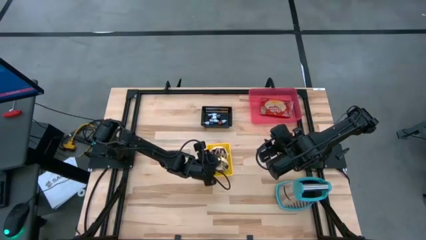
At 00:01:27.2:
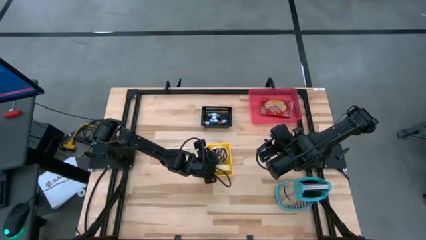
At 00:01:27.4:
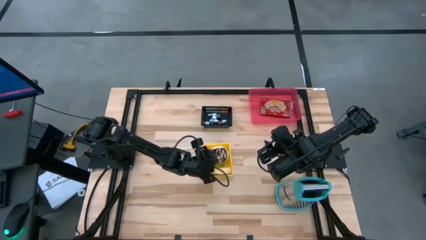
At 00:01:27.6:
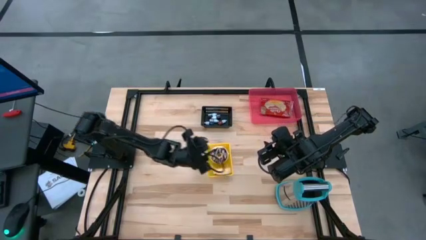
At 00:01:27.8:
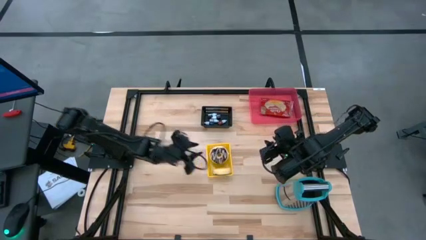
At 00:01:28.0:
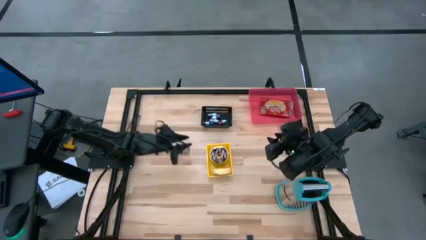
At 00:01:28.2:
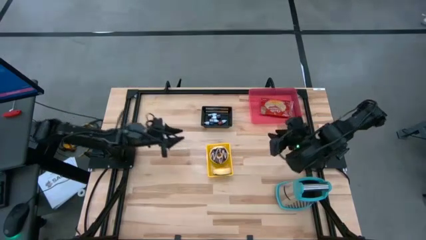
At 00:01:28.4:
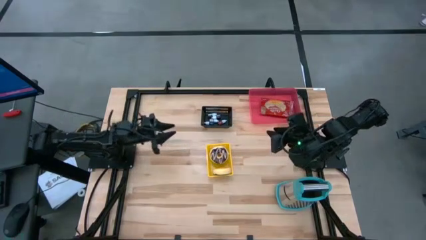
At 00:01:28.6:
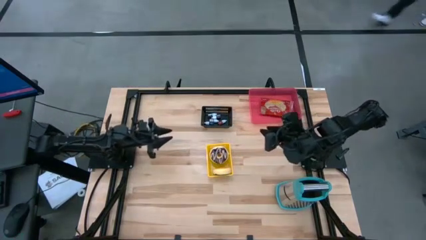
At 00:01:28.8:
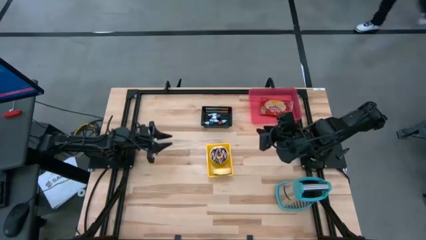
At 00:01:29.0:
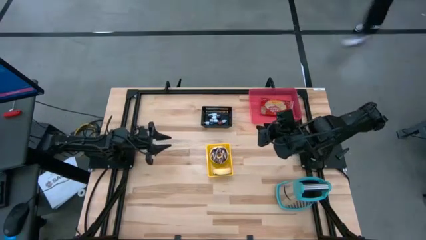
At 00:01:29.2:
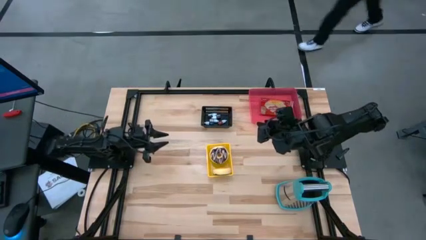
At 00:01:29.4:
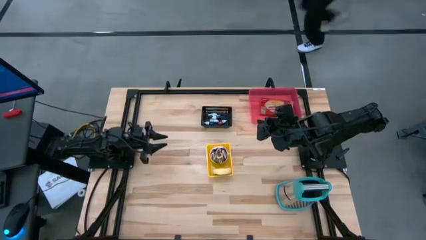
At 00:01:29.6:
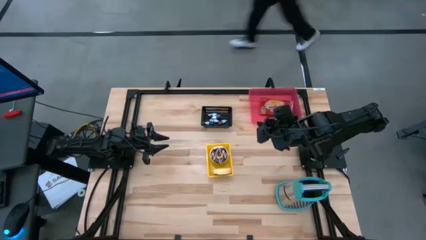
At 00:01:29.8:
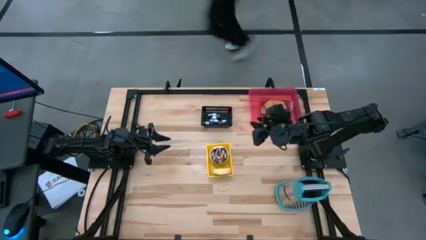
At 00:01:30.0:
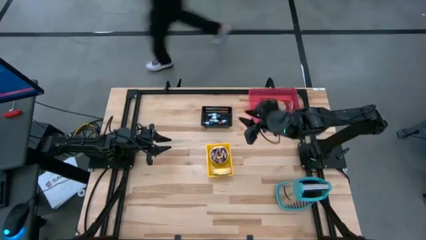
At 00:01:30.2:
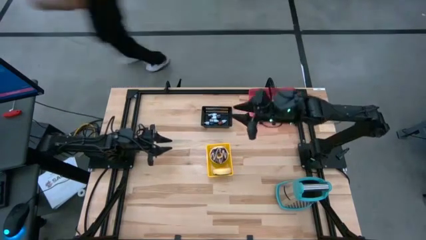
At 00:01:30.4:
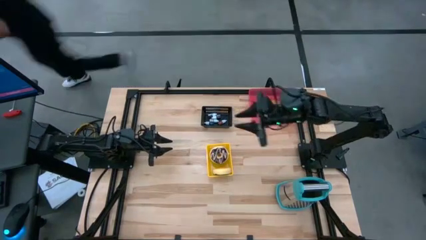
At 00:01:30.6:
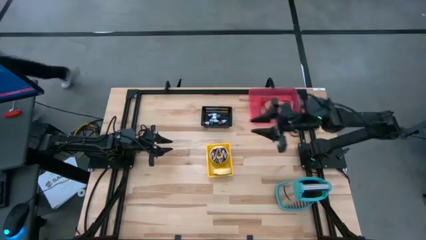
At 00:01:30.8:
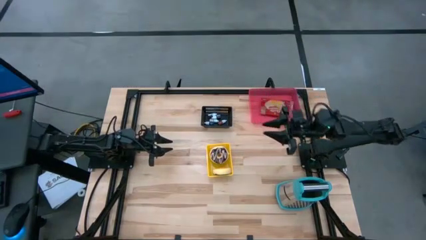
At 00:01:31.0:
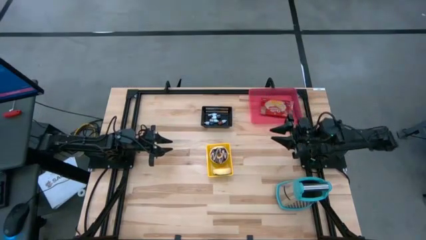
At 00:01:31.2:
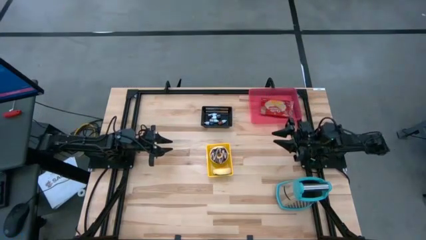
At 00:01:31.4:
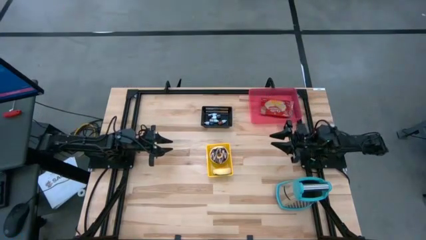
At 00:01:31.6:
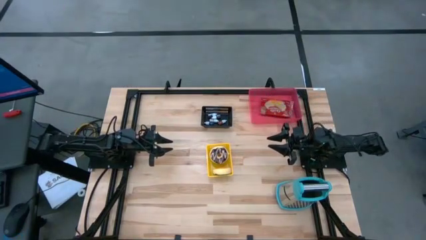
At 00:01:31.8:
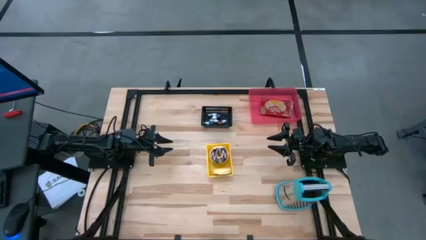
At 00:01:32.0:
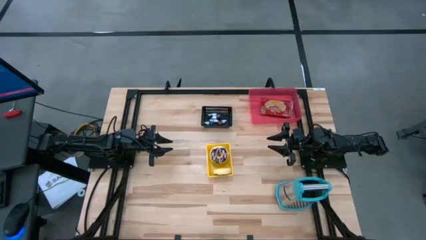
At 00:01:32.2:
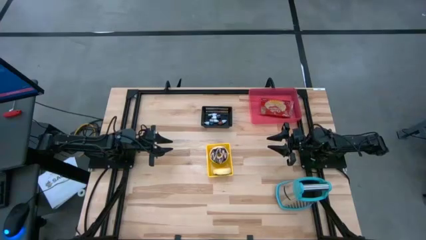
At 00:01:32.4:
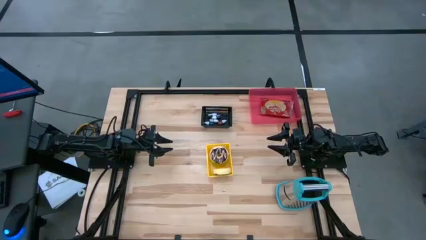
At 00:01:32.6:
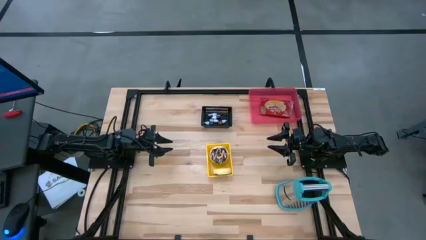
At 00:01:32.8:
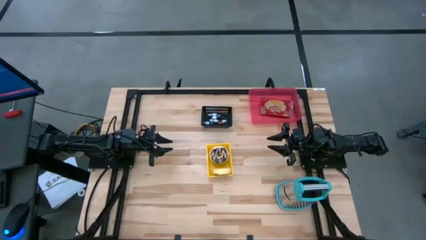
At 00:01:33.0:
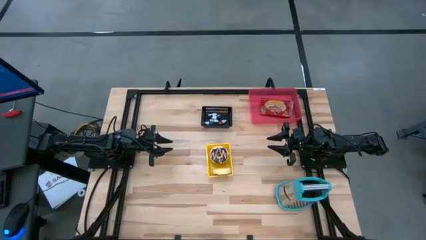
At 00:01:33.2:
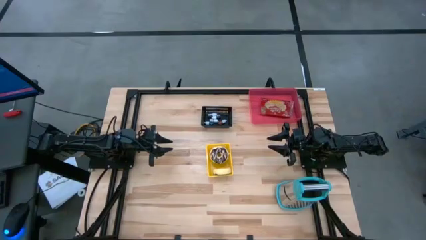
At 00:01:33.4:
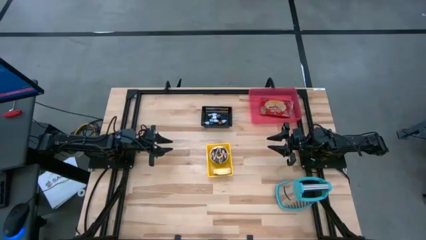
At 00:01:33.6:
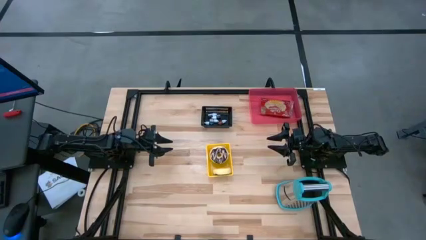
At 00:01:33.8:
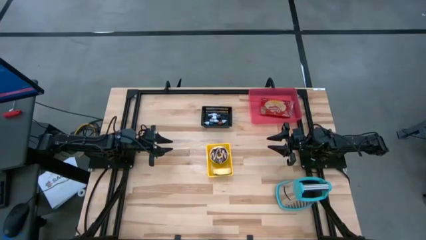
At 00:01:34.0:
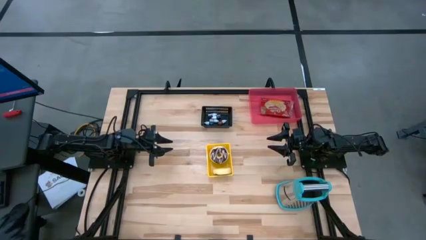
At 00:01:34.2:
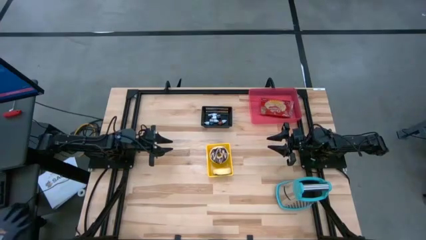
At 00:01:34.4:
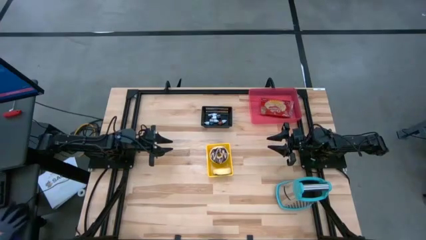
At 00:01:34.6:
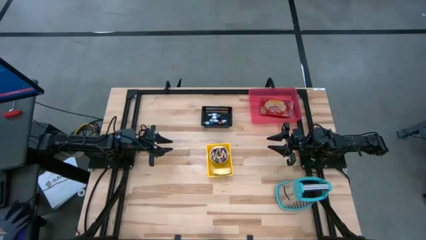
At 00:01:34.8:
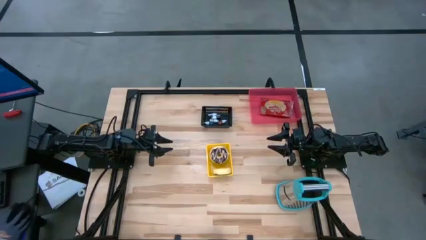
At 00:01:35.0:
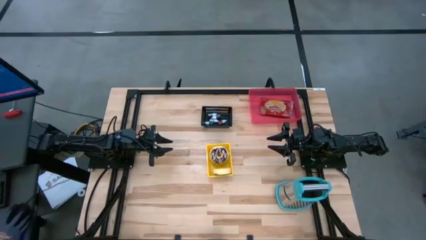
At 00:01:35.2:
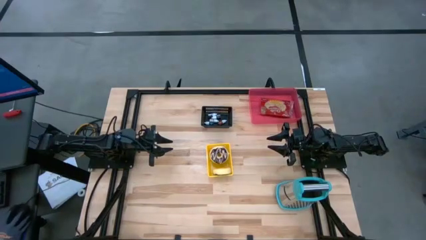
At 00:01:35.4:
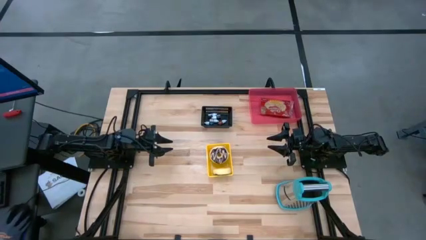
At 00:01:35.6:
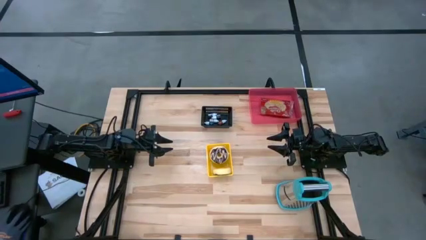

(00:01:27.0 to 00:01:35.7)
Return to Home Position

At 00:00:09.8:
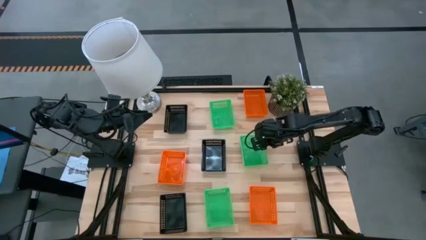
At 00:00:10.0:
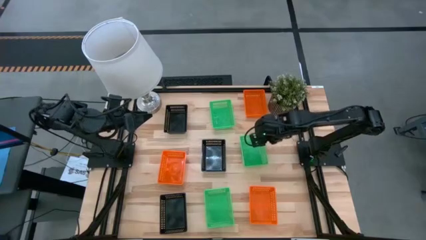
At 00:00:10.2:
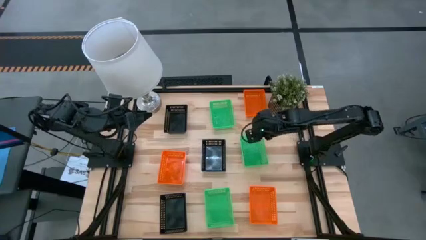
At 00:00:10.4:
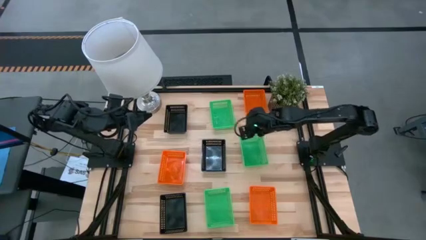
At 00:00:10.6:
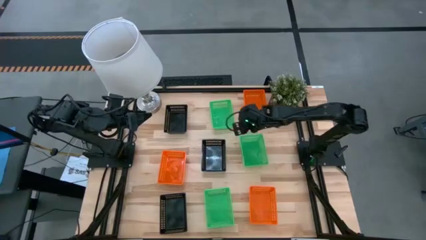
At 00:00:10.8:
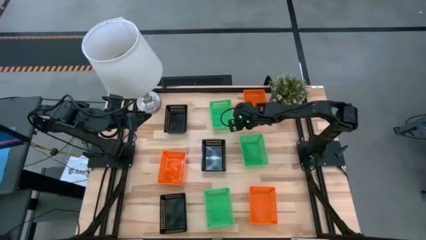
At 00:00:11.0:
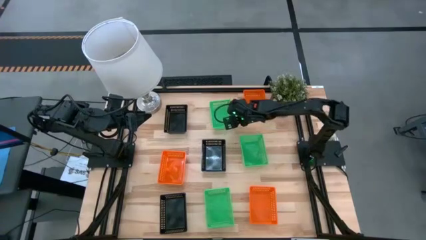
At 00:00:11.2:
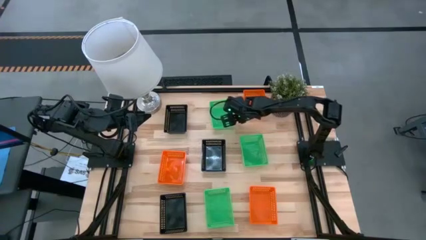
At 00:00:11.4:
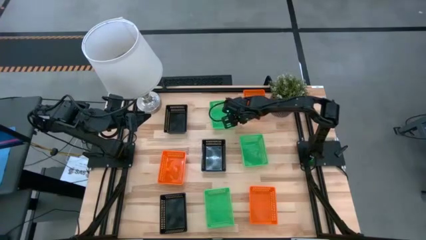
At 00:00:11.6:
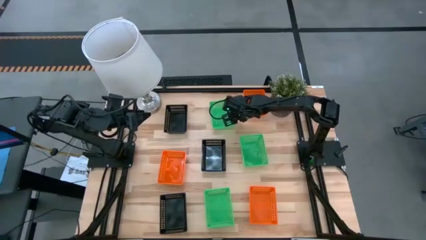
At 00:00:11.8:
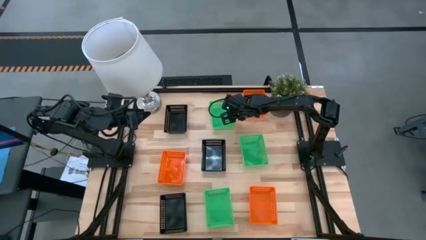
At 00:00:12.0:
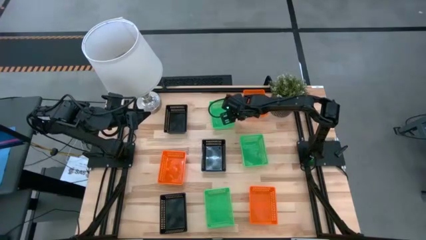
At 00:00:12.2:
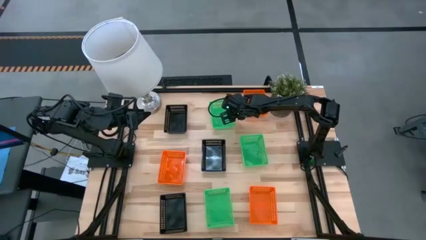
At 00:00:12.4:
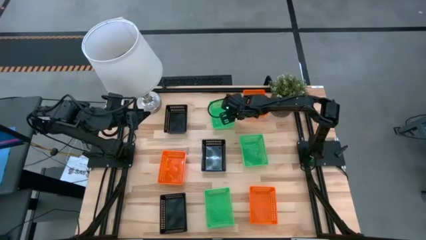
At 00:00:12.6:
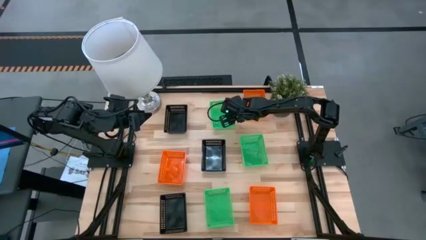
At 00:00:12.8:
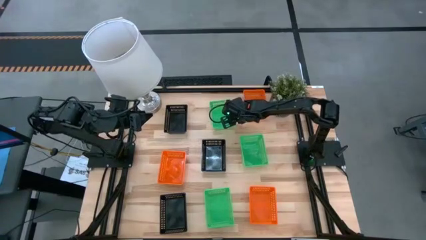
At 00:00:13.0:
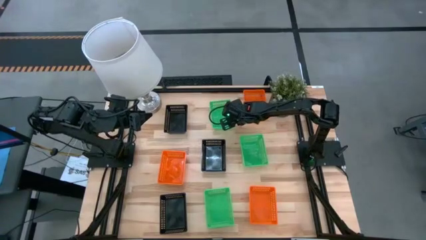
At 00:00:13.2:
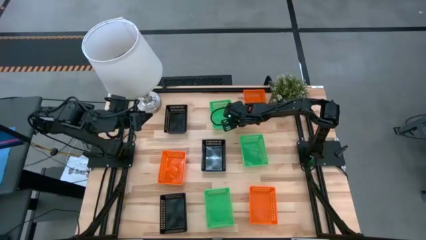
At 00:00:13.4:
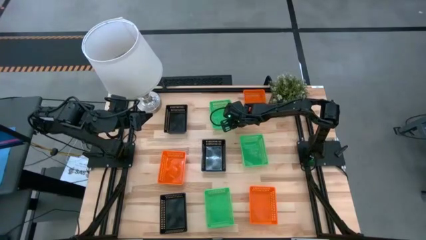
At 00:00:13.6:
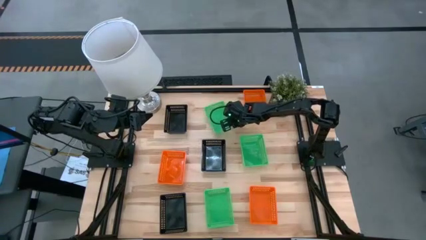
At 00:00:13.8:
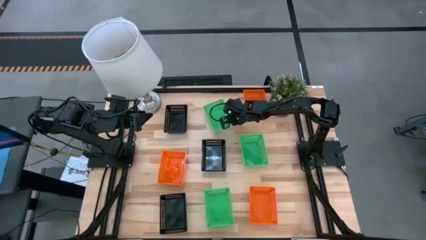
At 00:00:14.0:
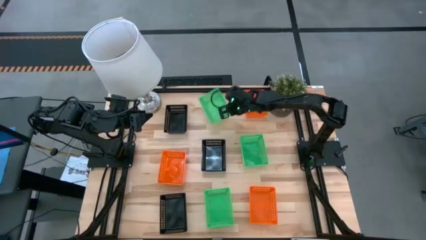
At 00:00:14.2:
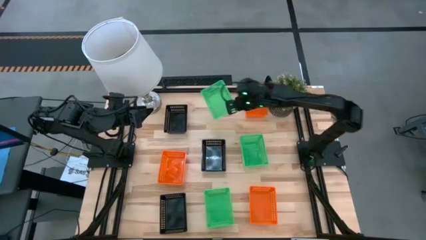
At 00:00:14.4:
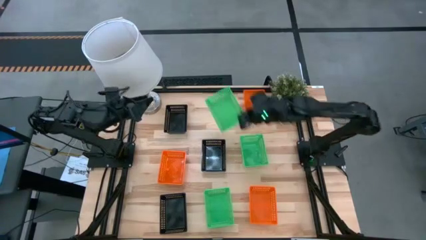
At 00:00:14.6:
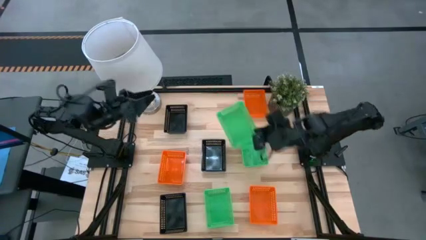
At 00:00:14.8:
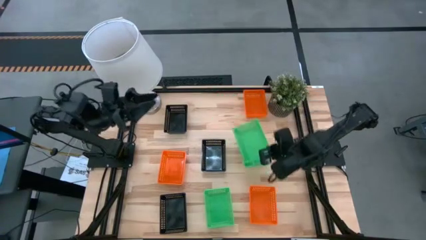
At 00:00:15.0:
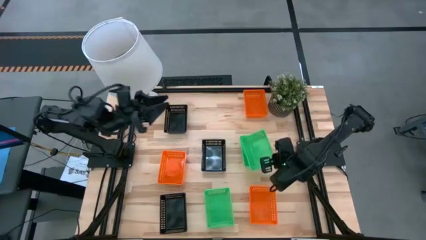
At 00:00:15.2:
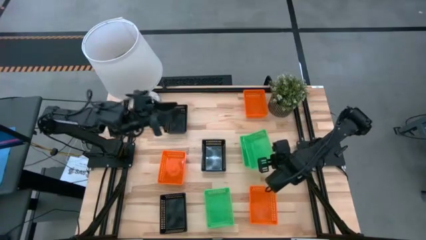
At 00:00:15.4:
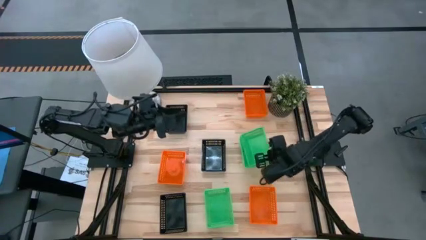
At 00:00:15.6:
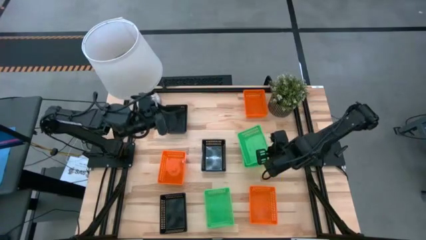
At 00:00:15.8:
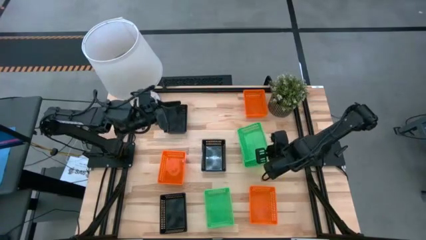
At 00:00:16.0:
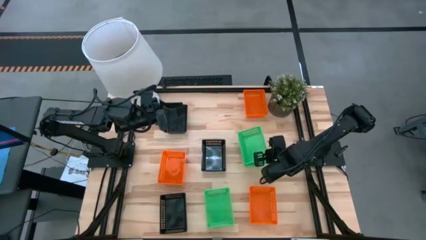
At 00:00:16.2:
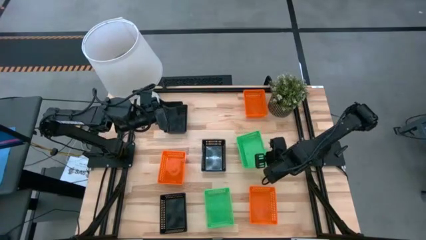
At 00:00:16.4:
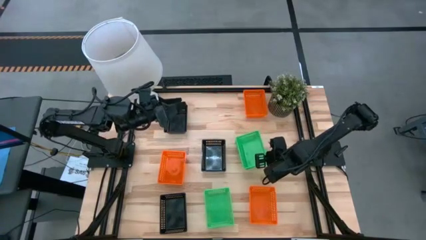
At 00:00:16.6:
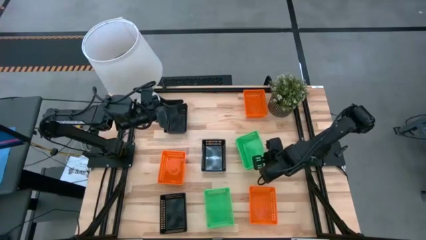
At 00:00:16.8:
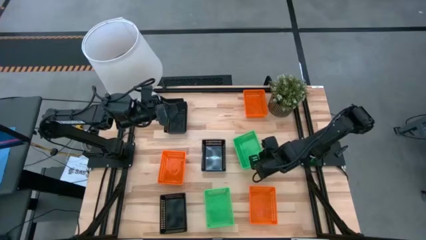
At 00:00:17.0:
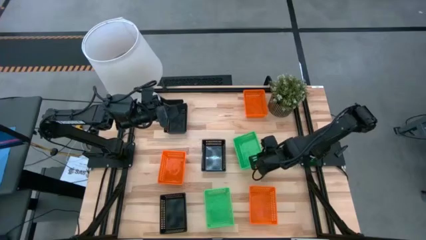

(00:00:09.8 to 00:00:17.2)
Stack the top green bin on the middle right green bin
